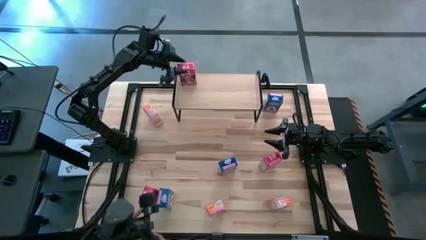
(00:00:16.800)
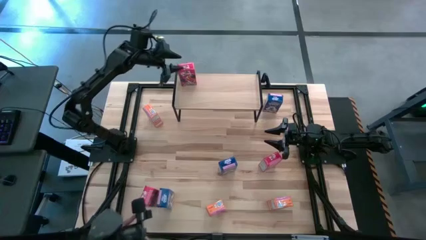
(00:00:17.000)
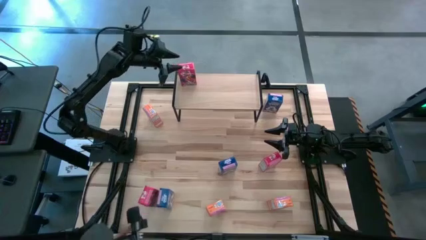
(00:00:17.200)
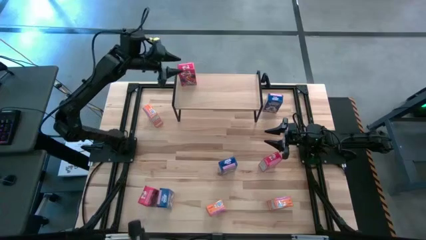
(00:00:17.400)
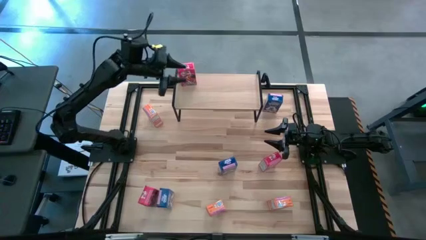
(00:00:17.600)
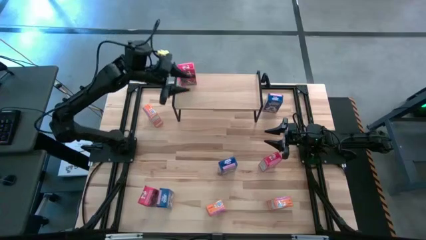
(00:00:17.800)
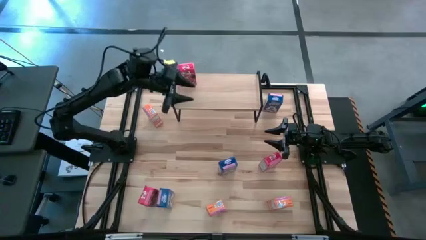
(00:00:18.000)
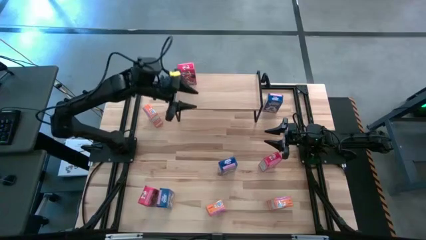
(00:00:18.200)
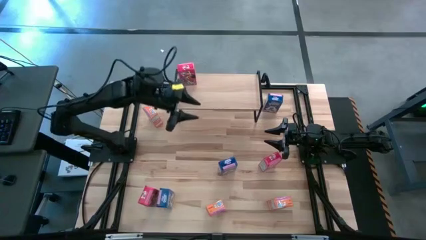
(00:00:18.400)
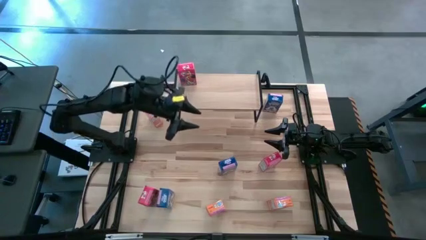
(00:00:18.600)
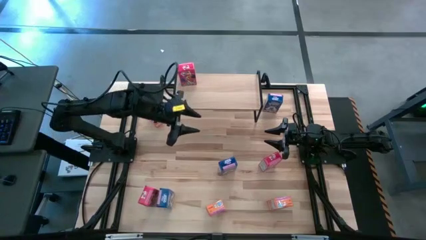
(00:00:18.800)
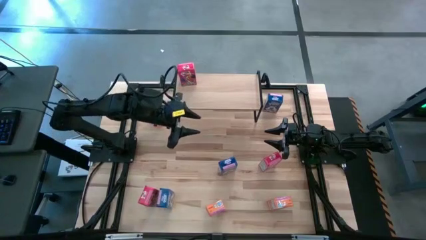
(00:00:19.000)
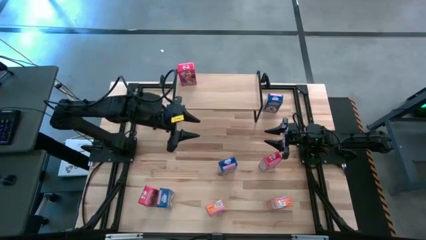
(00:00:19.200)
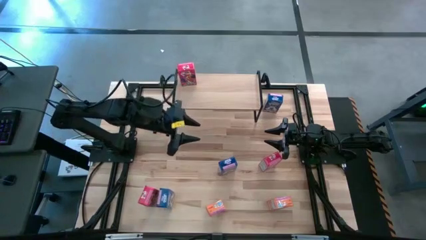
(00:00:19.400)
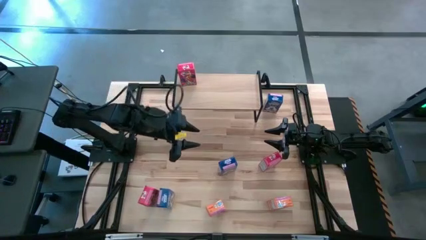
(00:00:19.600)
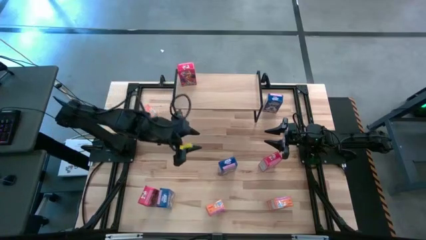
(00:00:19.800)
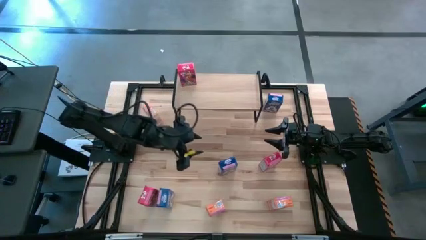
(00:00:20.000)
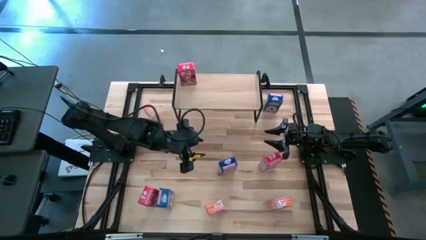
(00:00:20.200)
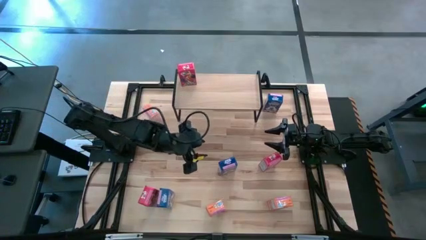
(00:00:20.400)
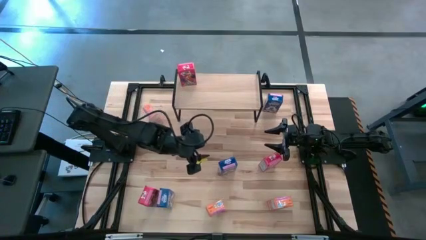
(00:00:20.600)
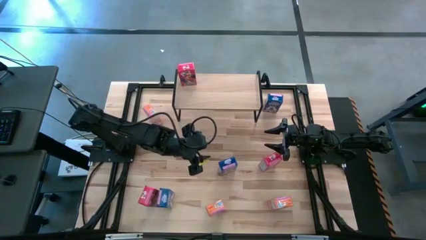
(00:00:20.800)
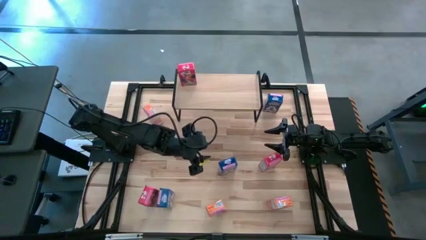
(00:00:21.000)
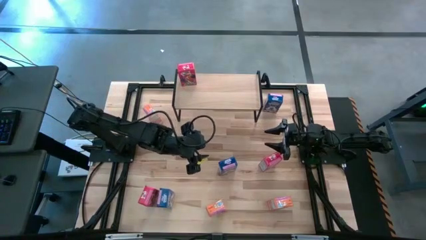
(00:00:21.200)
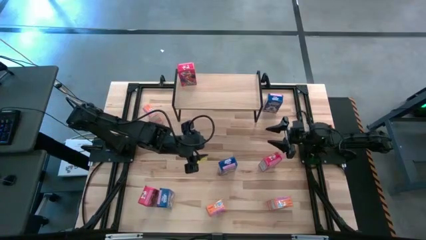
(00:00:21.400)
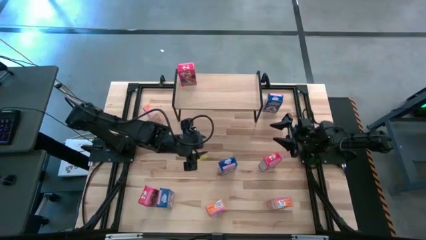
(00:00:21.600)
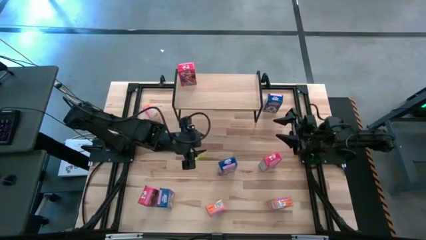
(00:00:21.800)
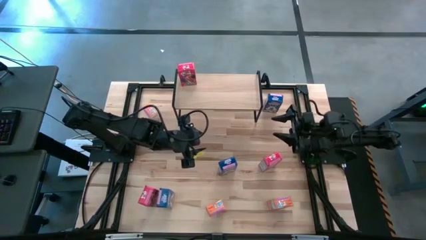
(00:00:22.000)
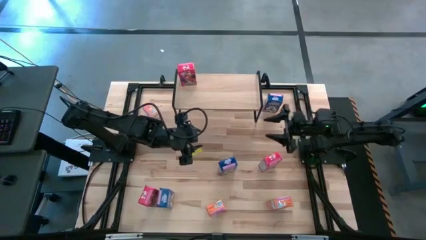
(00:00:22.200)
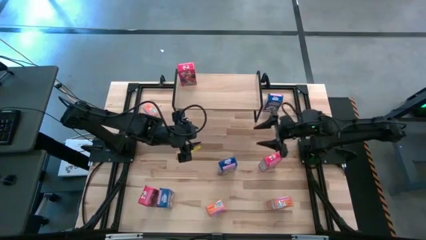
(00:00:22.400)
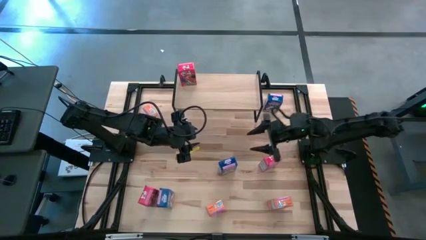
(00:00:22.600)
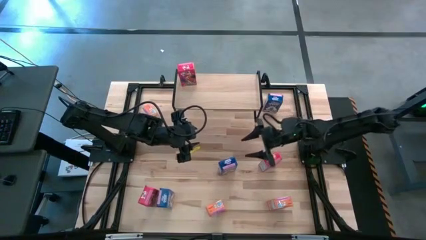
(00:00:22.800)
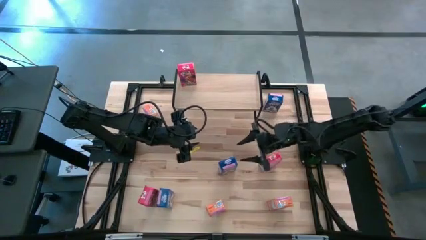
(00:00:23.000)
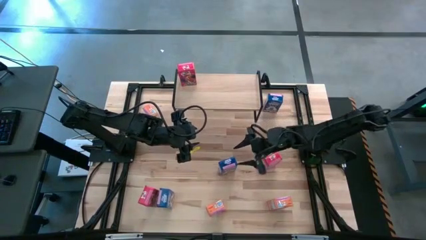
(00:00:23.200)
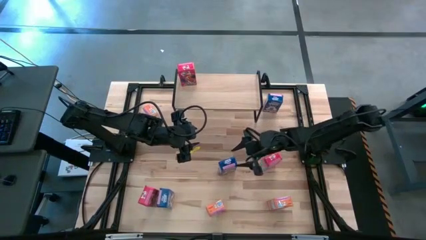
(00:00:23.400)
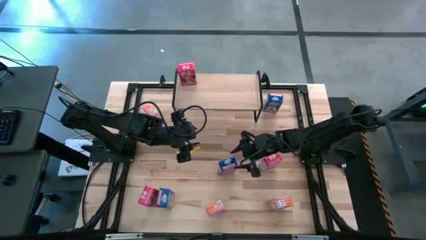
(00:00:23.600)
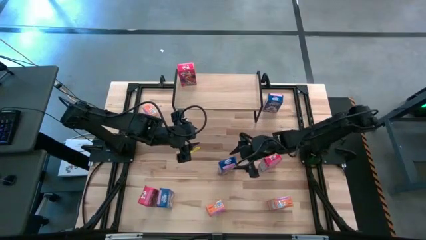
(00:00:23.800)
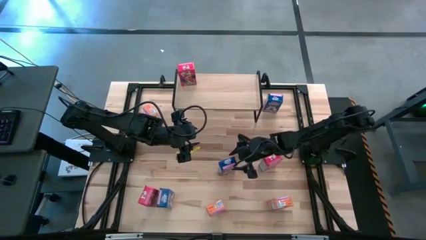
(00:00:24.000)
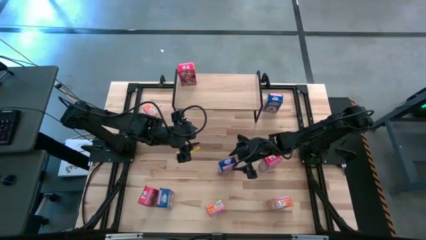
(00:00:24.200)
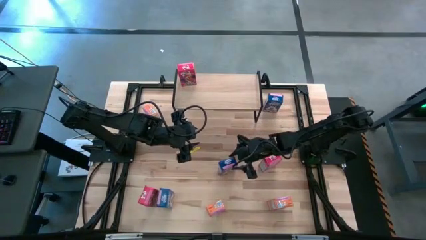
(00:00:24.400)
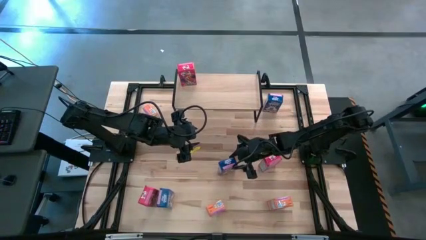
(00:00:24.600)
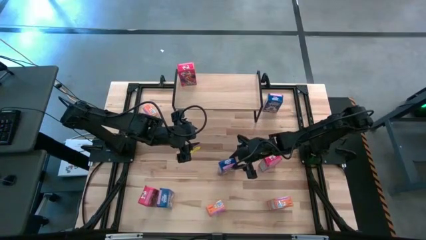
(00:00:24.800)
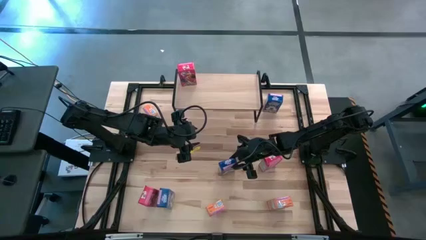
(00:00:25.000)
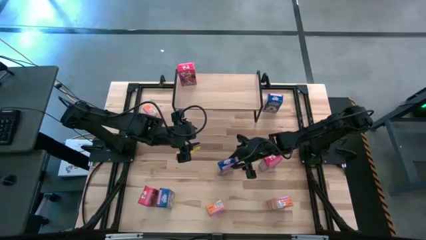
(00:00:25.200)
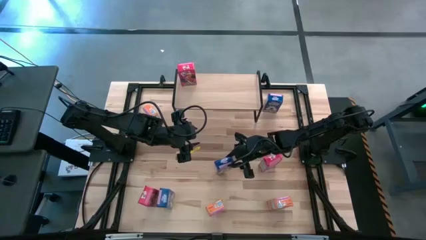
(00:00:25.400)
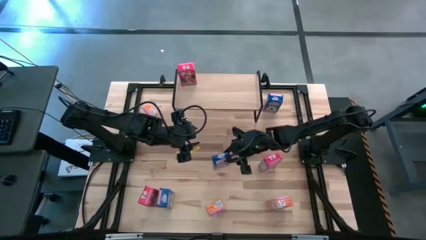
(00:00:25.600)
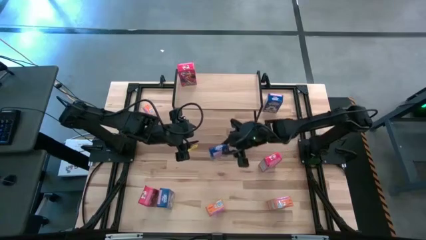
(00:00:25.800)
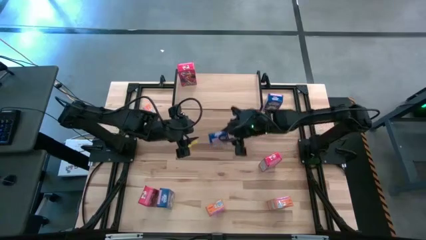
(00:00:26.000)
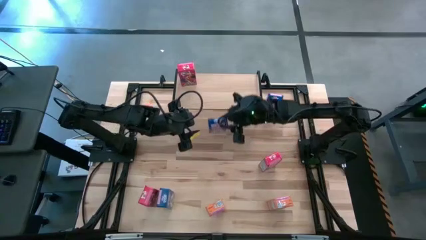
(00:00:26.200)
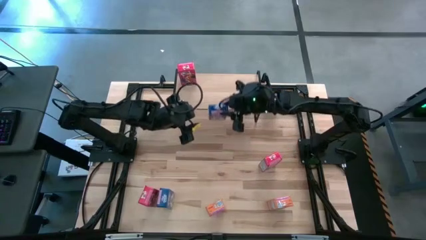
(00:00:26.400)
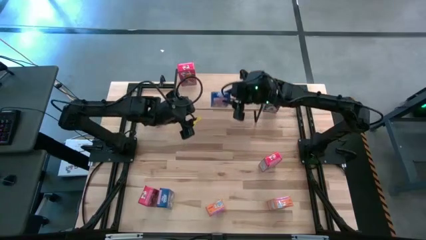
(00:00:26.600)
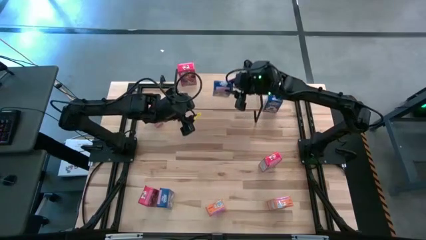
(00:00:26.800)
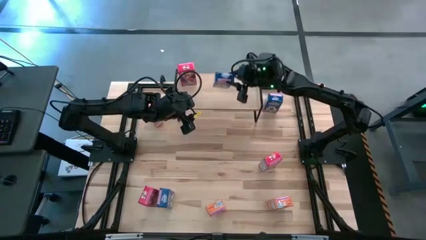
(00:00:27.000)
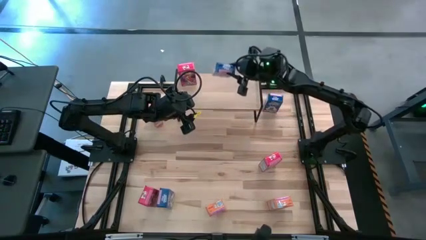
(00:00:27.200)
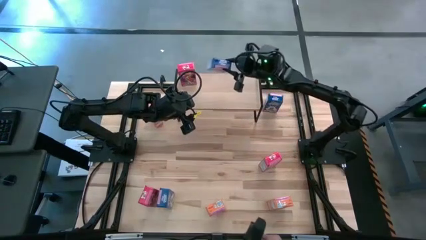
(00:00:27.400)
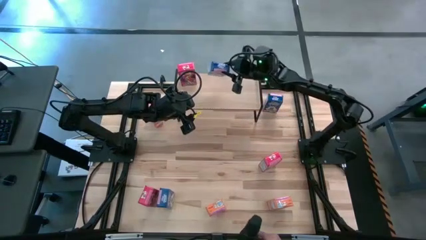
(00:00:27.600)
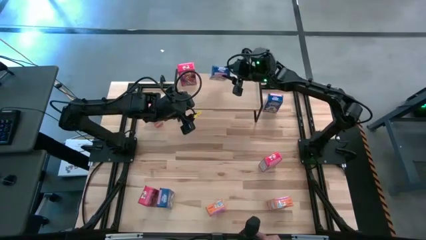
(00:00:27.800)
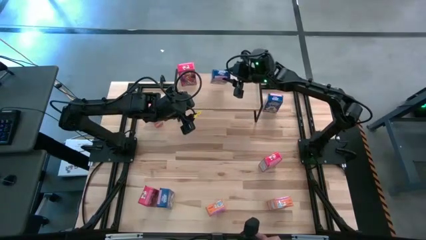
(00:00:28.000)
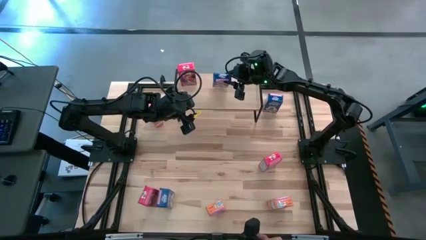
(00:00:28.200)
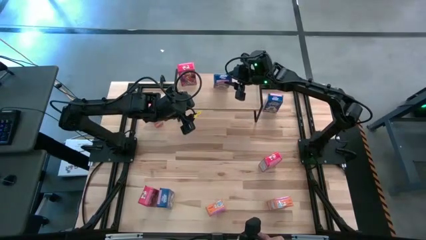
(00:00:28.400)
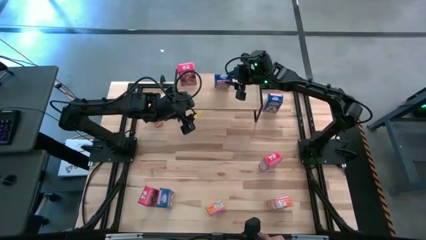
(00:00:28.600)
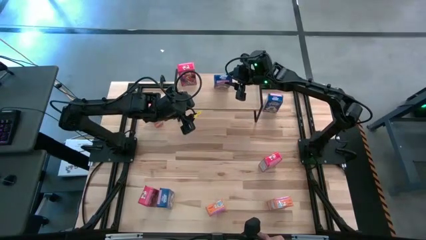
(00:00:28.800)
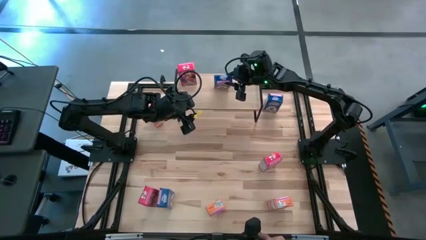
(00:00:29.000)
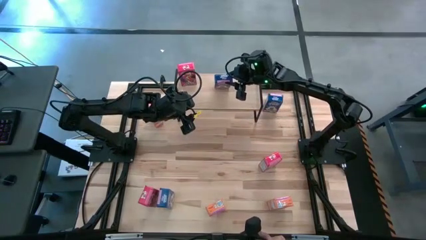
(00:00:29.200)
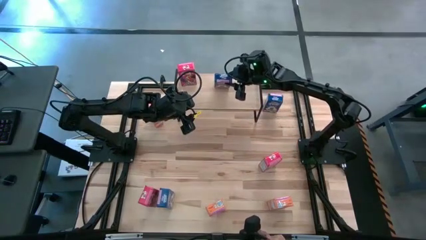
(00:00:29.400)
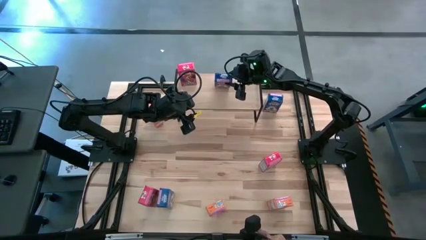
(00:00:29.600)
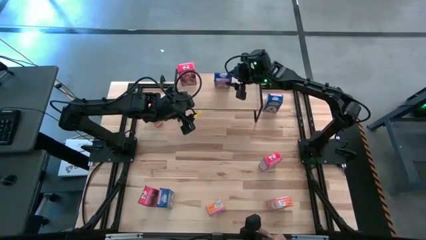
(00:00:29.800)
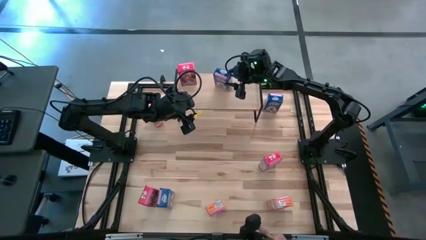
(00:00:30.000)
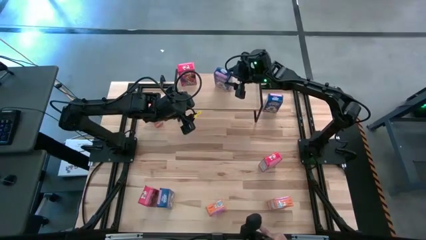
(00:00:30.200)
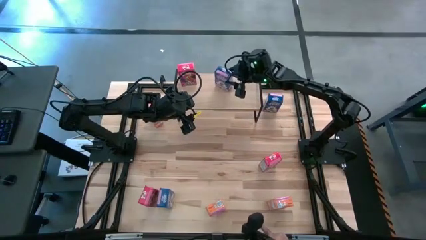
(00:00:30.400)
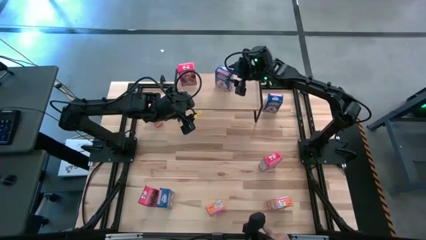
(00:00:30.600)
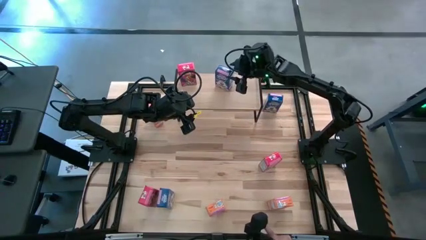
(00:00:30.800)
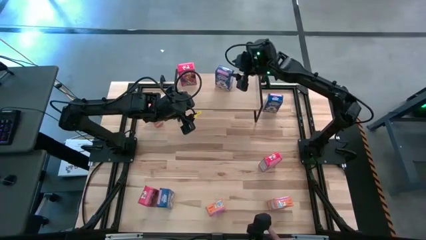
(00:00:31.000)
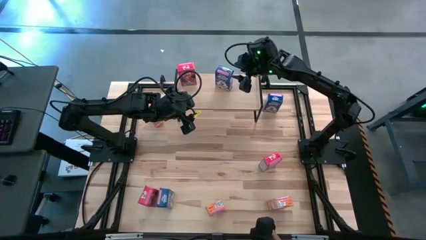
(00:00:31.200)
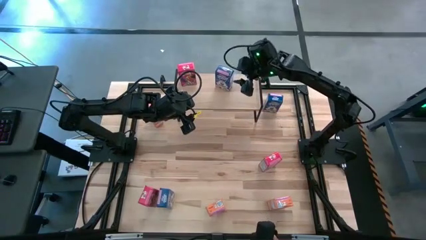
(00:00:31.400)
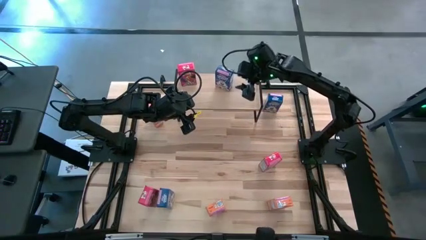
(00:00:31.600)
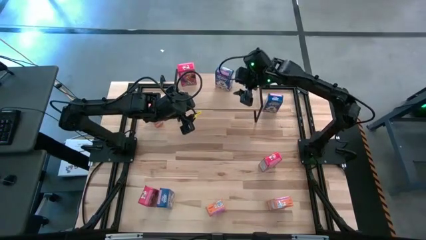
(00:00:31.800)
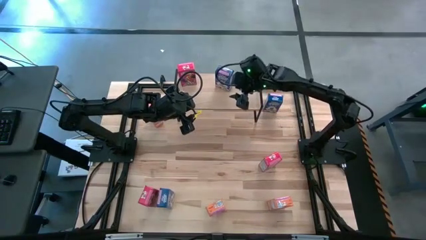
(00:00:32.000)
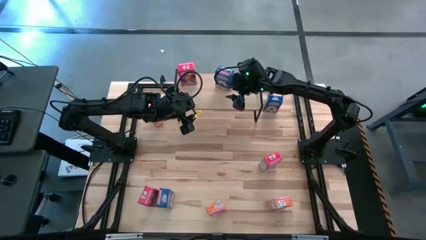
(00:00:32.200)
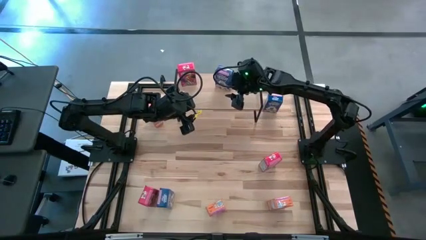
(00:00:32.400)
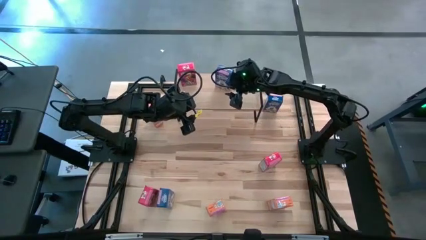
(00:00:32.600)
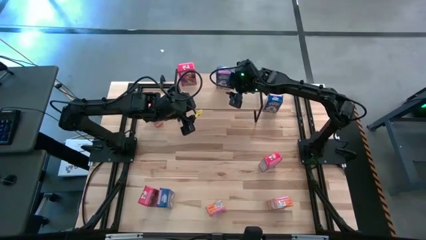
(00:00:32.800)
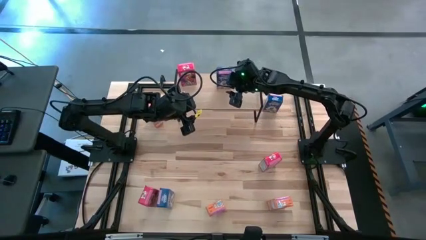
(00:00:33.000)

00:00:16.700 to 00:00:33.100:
Task: Stack cereal on shelf
Put the middle blue cereal box on the shelf
